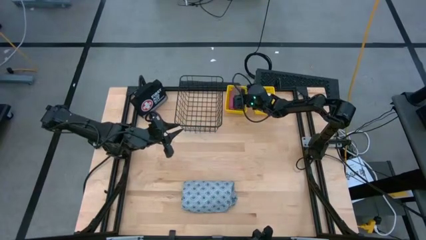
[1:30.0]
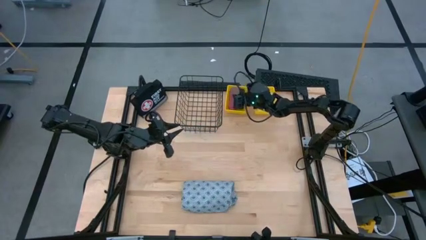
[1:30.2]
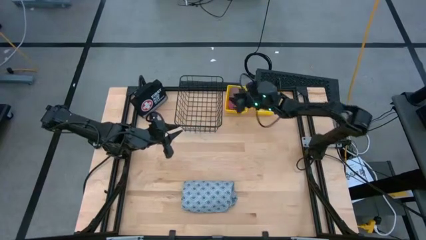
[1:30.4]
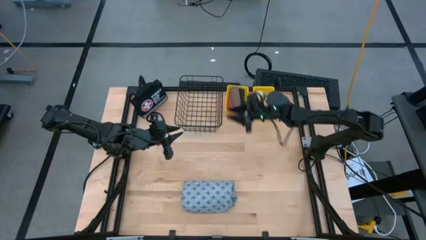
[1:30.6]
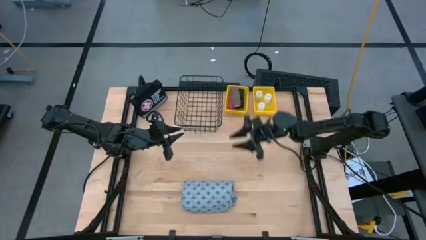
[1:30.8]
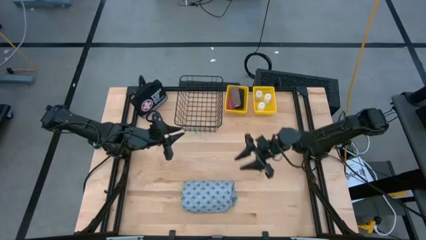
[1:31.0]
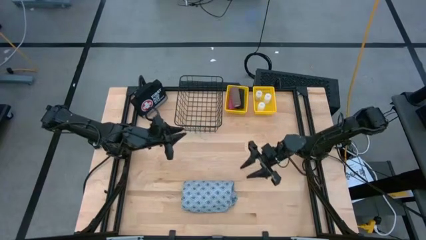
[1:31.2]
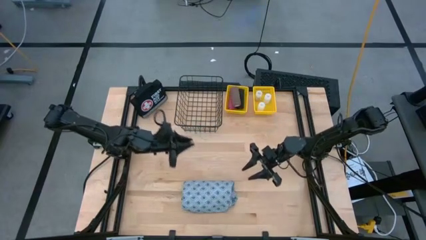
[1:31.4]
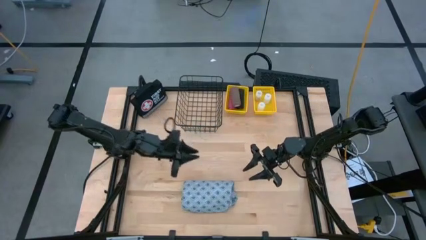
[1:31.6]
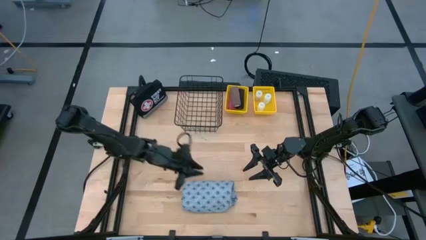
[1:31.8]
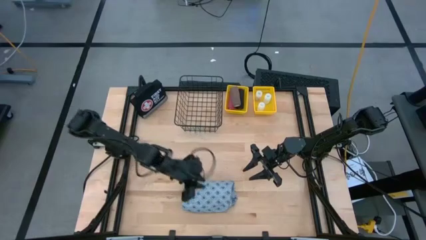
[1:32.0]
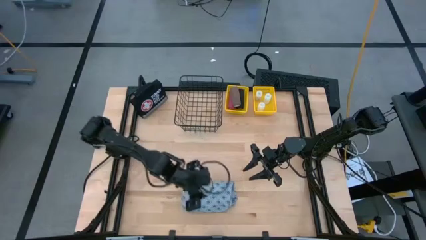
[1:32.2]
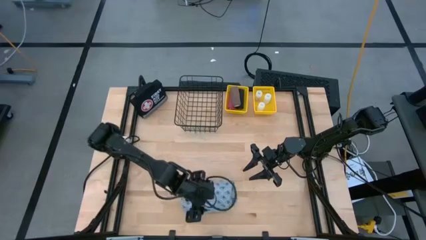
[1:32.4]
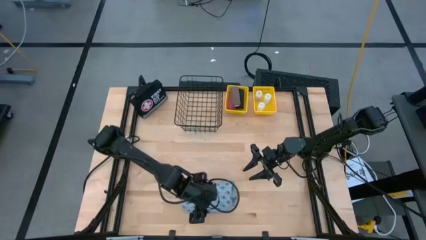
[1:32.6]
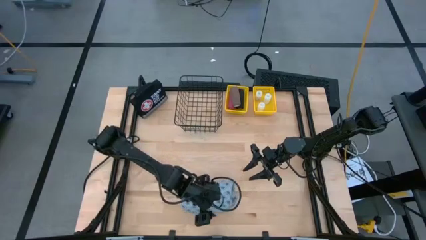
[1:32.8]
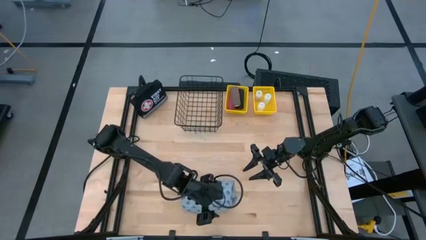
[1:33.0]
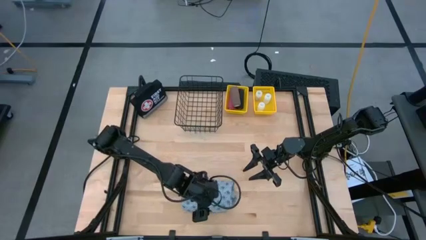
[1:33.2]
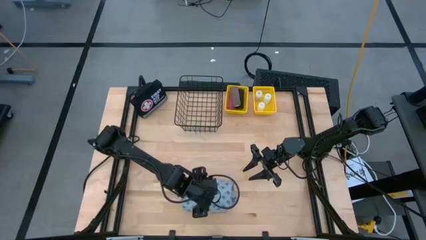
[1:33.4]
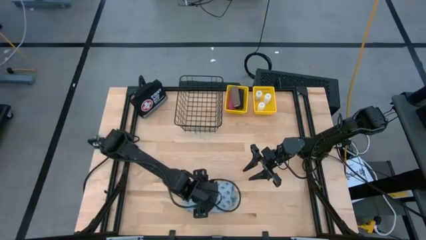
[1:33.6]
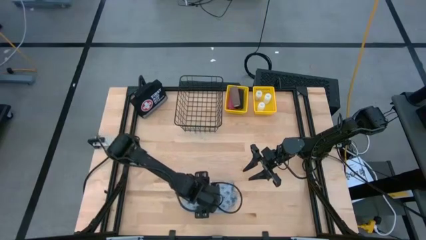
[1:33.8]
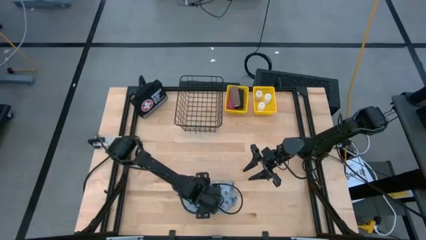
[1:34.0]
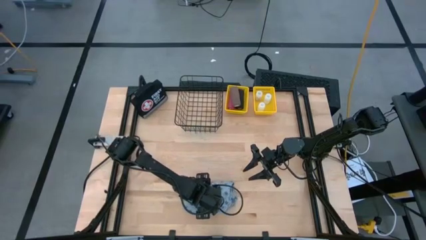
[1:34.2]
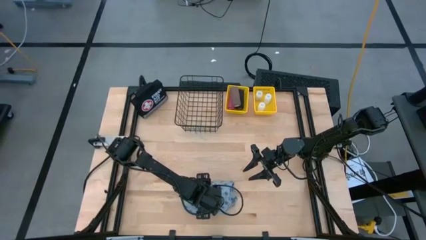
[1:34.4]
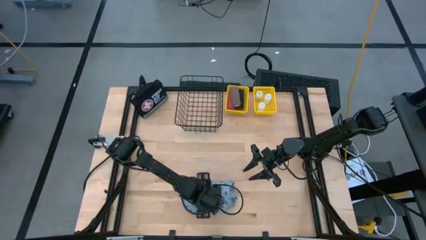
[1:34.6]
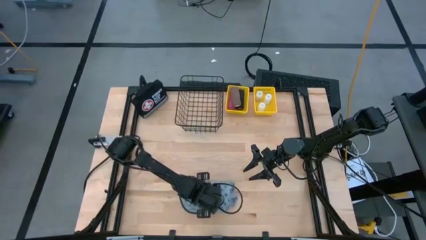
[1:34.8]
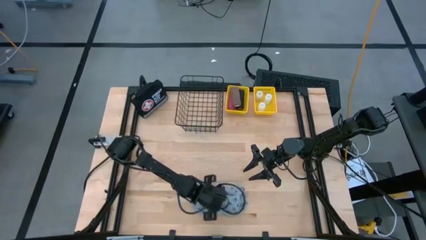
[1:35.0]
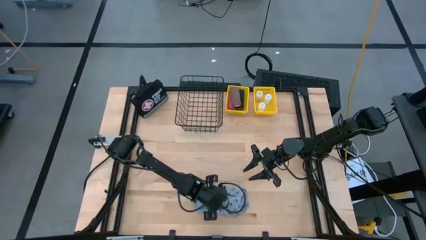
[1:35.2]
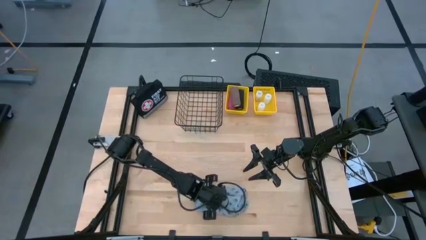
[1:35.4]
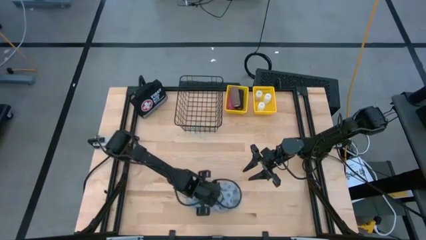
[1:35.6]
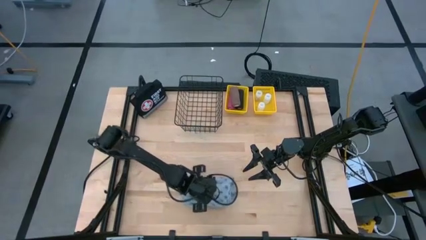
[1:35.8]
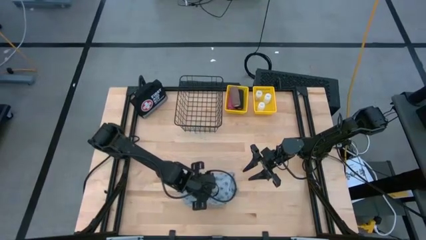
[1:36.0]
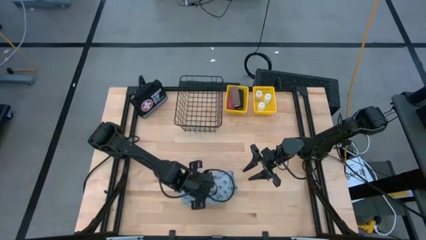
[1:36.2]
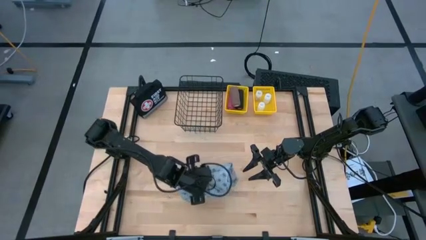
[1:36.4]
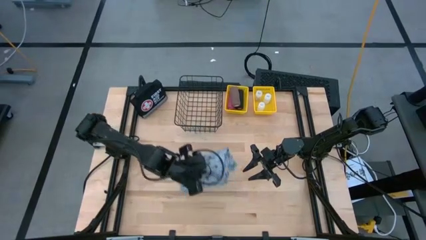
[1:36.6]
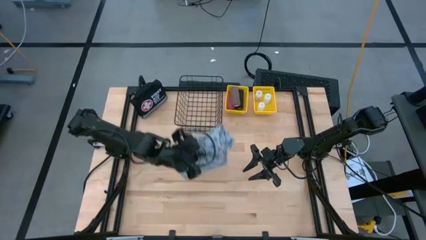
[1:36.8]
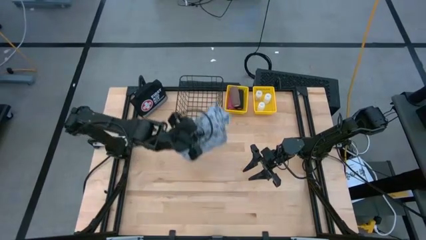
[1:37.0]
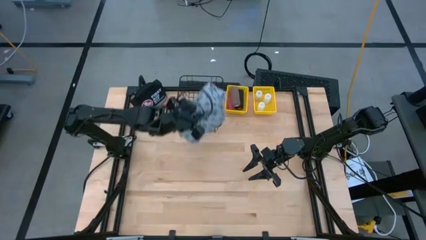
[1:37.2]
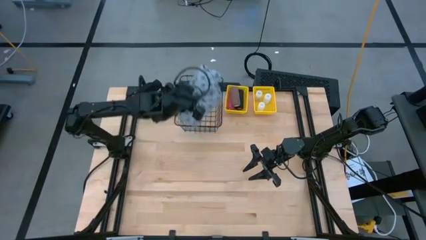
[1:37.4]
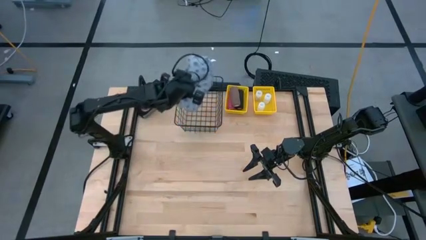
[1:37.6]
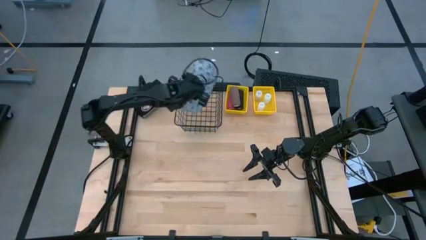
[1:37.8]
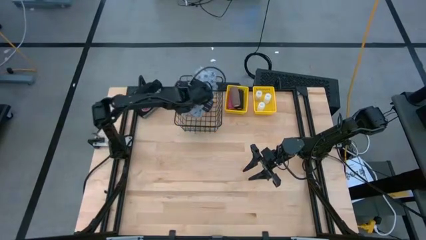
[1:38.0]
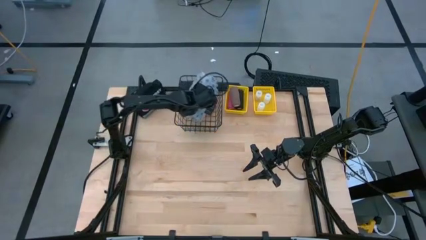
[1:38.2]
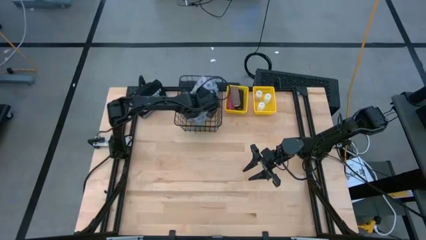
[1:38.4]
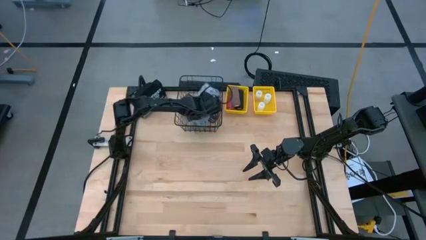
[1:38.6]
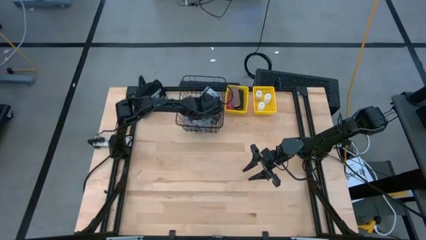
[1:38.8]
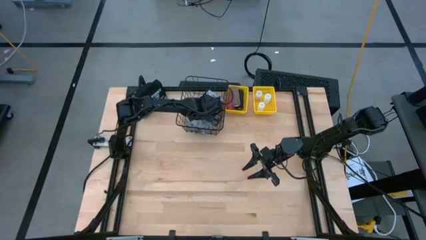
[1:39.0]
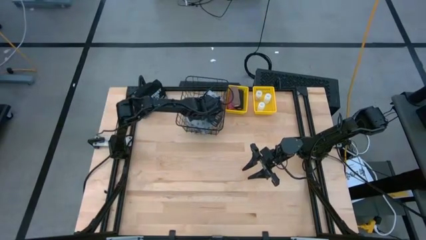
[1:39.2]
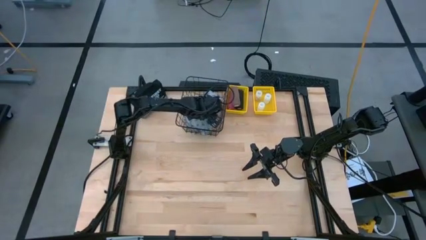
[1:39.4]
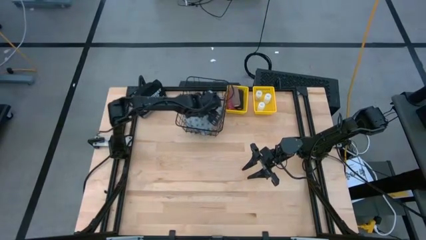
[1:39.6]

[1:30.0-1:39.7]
Task: Pick & Place Medicine items
Put the blue patient gown into the wire basket

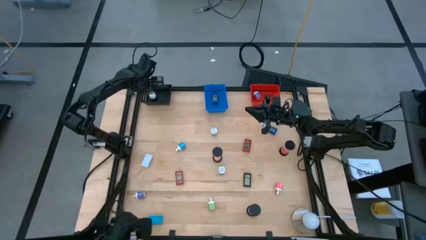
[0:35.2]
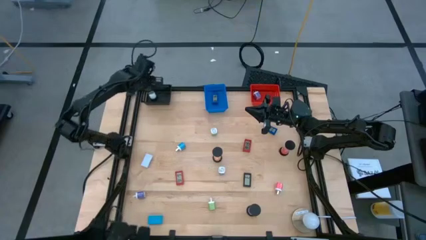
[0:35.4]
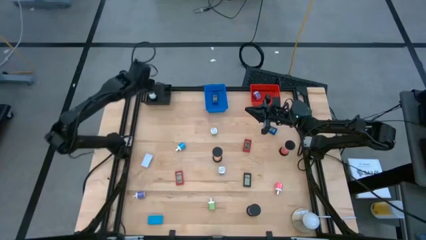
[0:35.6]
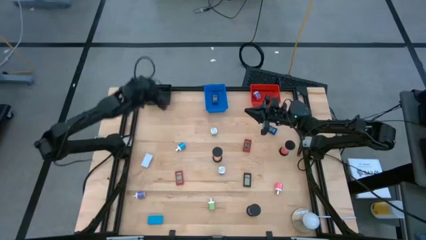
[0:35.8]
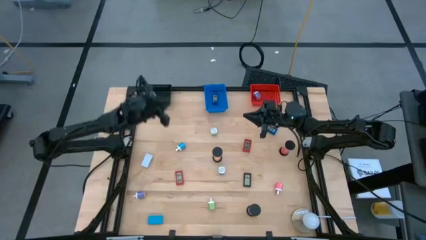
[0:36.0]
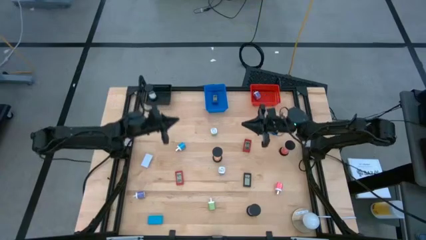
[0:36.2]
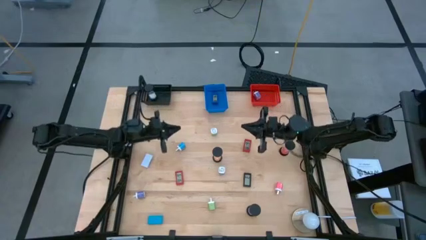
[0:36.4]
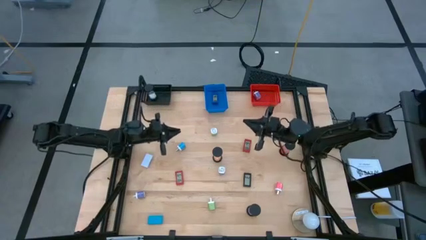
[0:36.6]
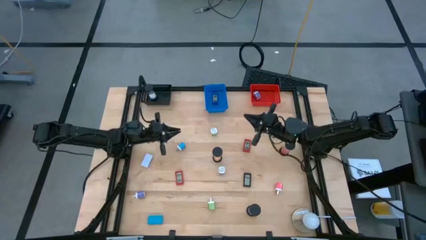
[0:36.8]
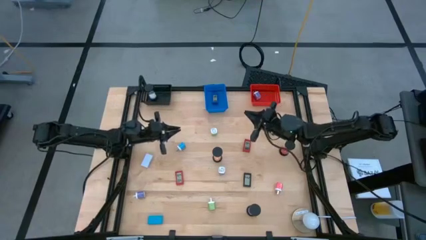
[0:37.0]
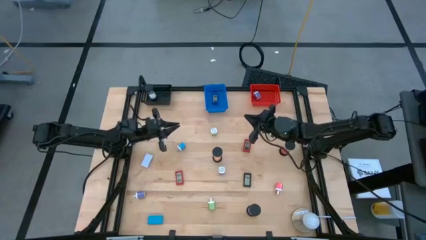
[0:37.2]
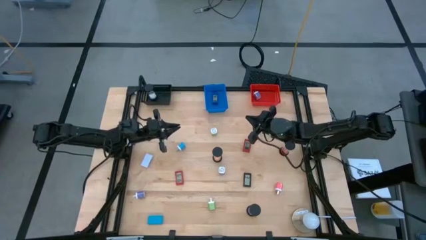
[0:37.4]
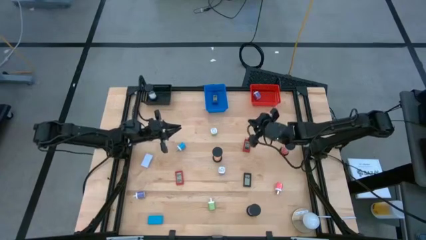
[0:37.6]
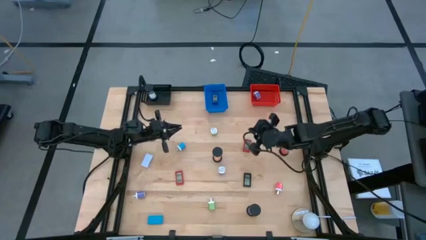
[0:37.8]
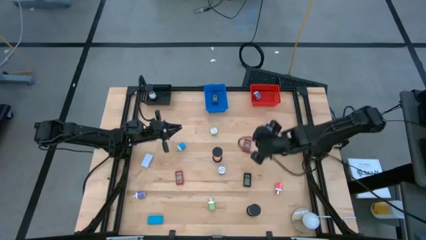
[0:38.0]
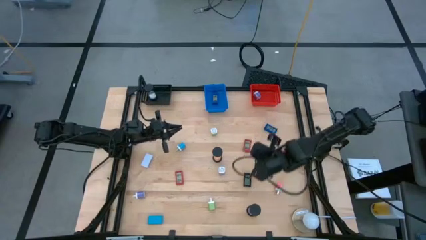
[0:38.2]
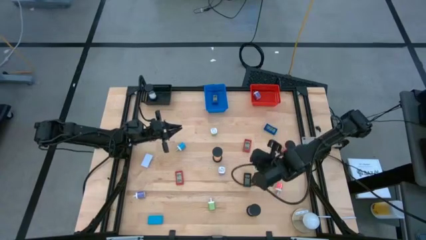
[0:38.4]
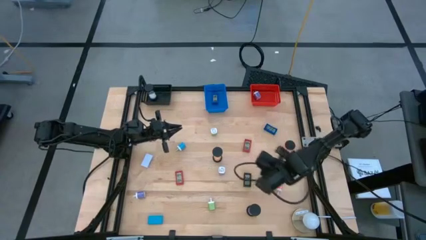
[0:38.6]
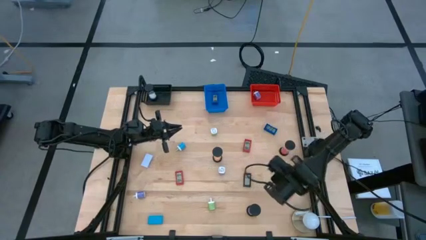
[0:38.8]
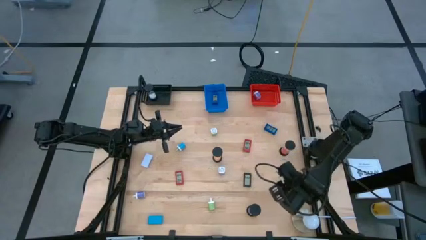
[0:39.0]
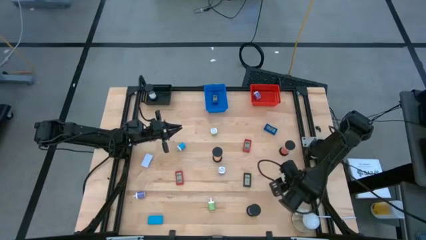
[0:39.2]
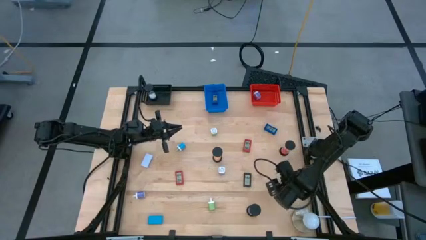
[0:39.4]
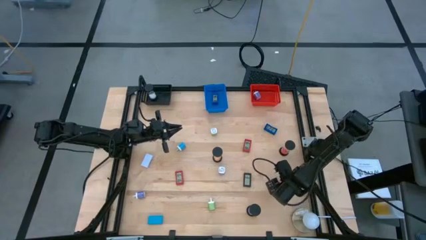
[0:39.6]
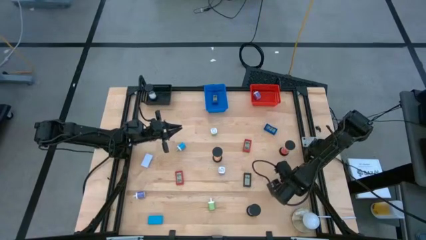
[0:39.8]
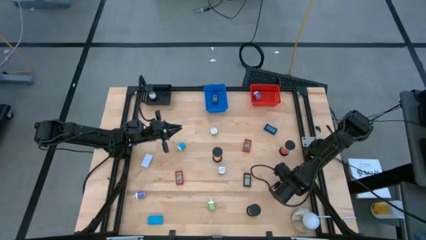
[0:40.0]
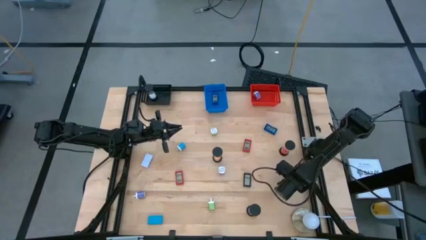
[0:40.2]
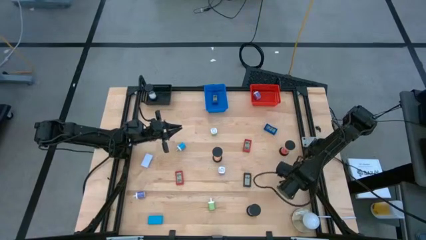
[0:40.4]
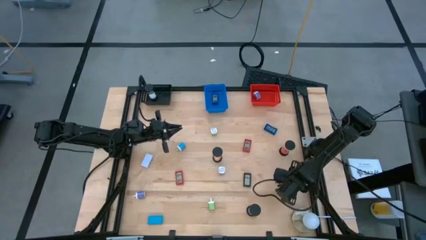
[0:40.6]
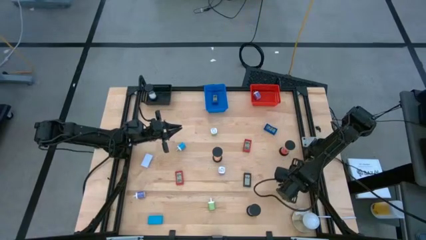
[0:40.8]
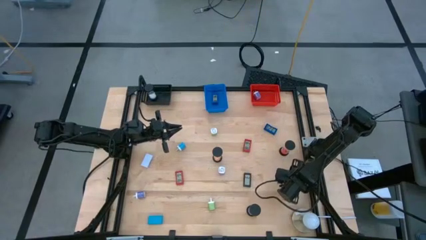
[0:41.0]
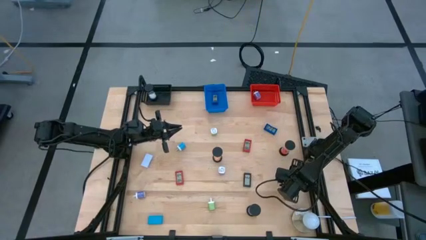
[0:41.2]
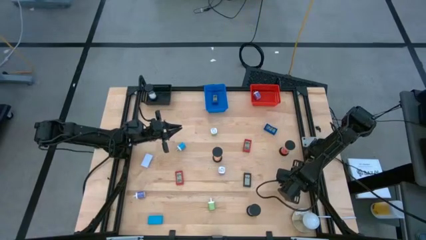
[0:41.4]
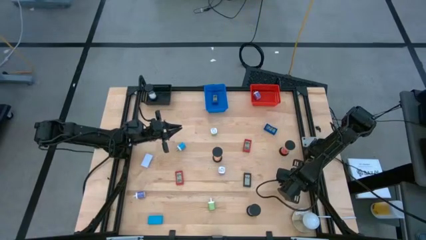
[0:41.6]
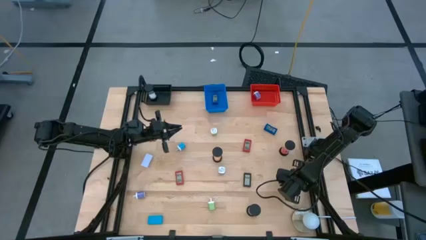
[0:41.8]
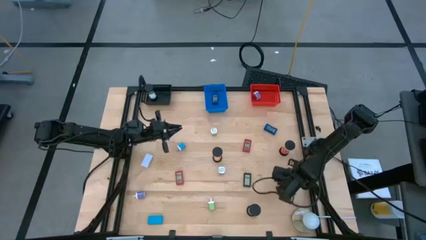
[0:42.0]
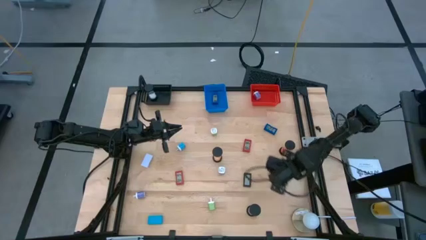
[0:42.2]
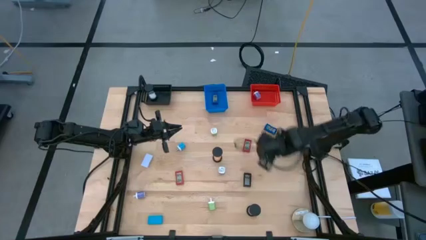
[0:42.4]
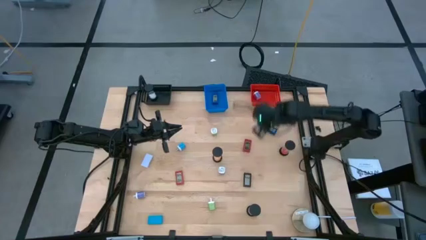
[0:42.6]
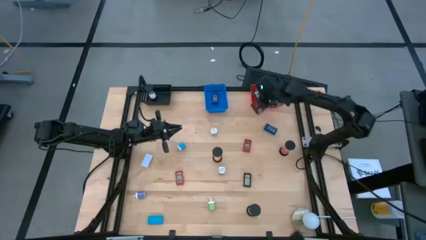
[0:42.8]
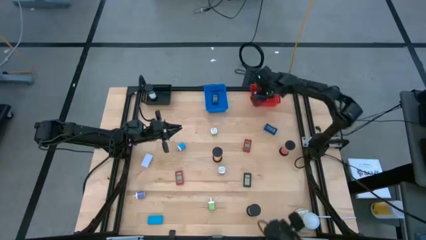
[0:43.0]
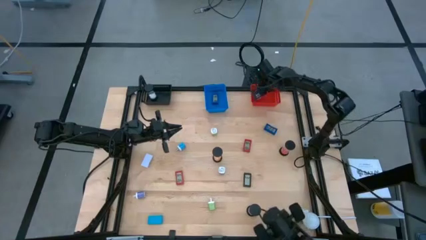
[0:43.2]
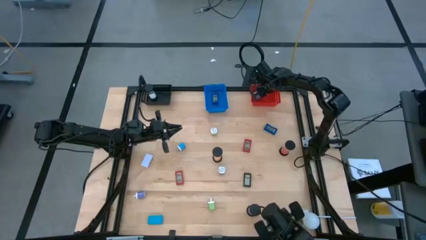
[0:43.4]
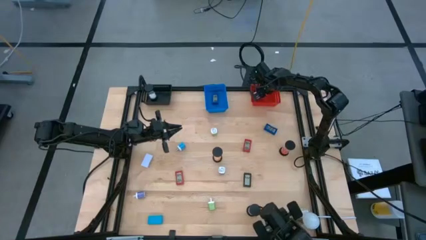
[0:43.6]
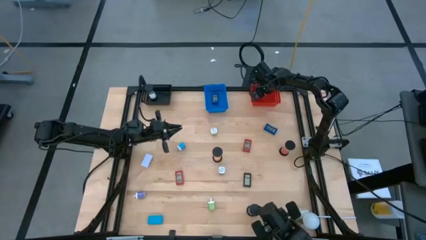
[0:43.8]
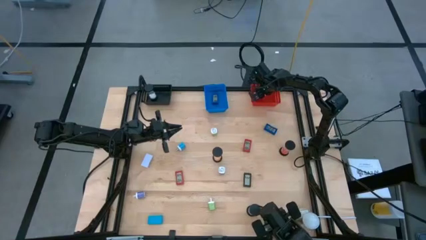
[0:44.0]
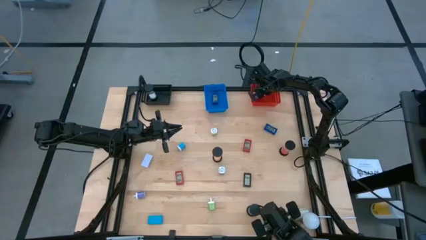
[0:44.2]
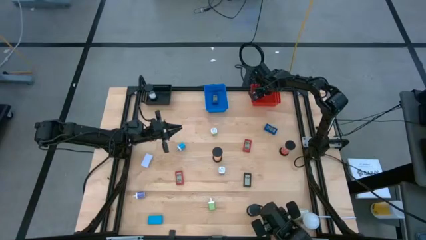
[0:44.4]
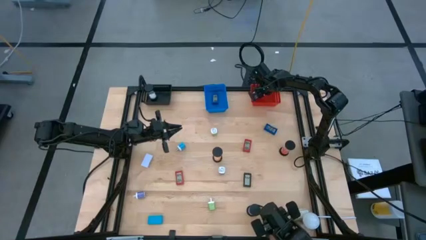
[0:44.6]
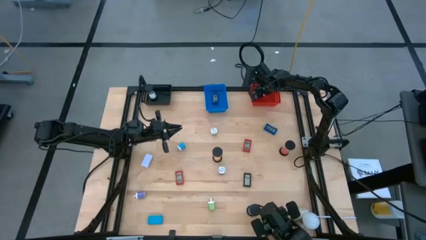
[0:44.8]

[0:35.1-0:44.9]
Task: Pick & Place Office items
Put the pink charger adapter into the red basket
